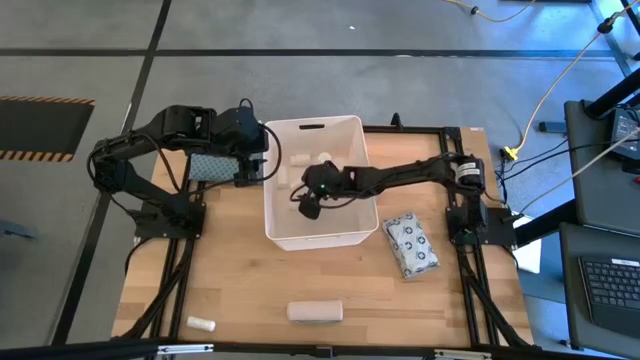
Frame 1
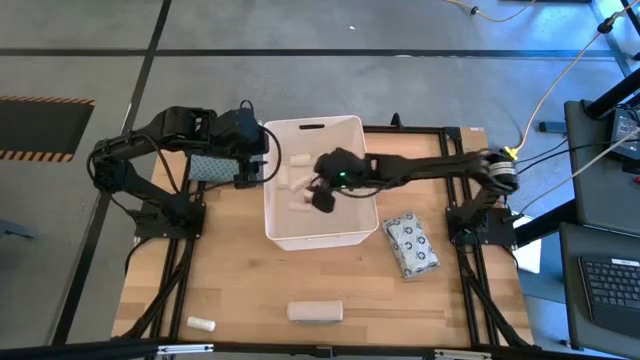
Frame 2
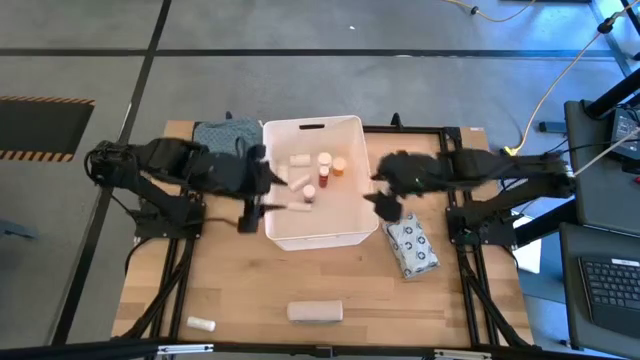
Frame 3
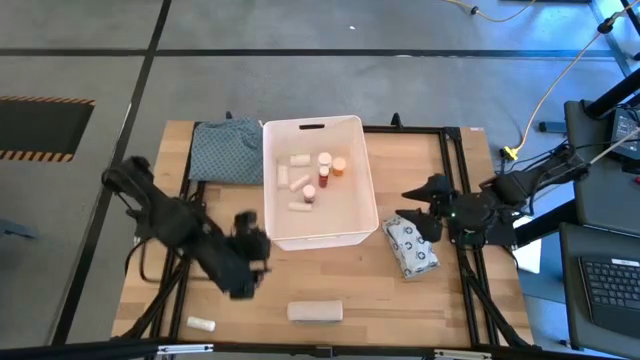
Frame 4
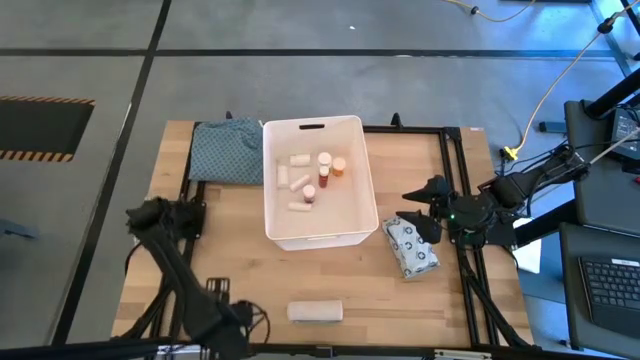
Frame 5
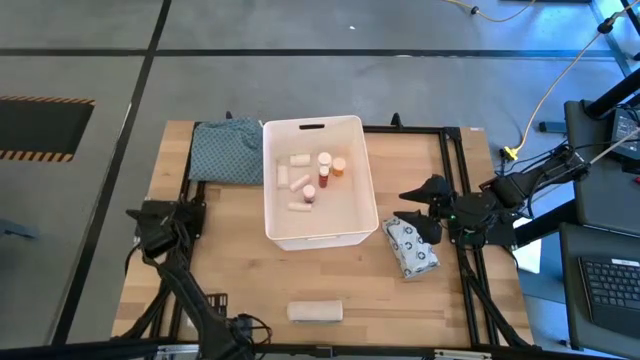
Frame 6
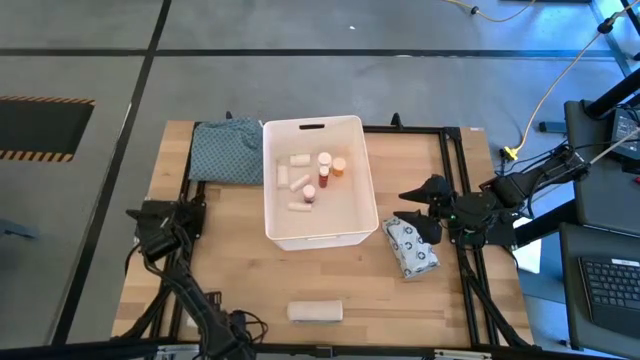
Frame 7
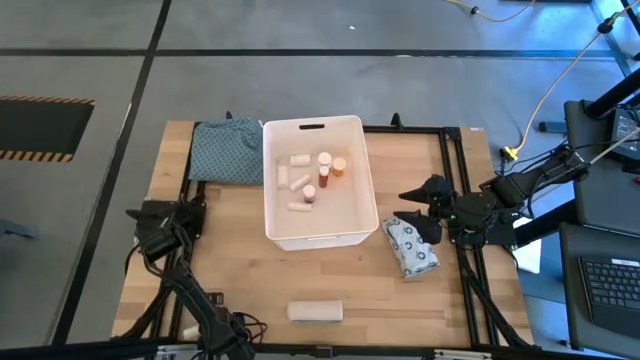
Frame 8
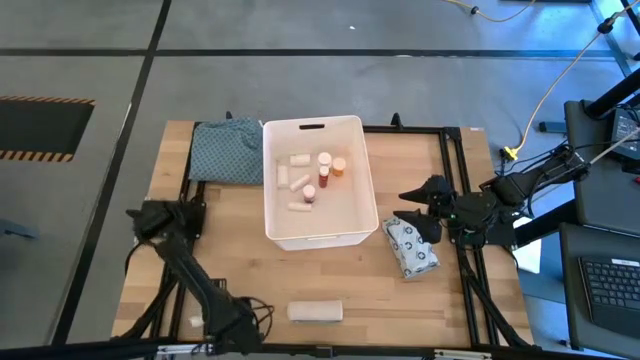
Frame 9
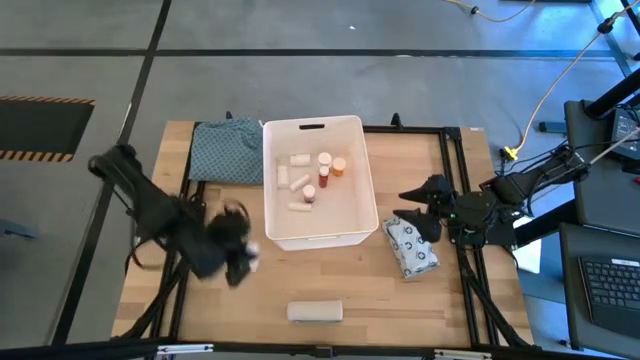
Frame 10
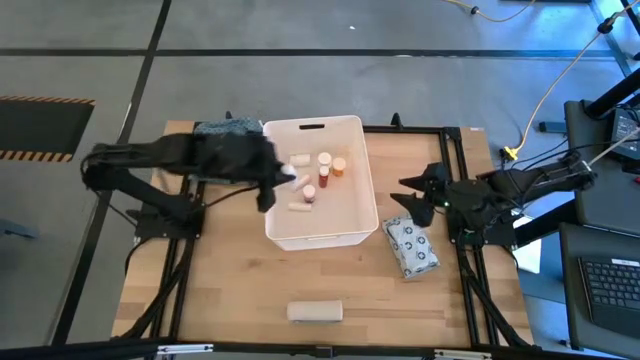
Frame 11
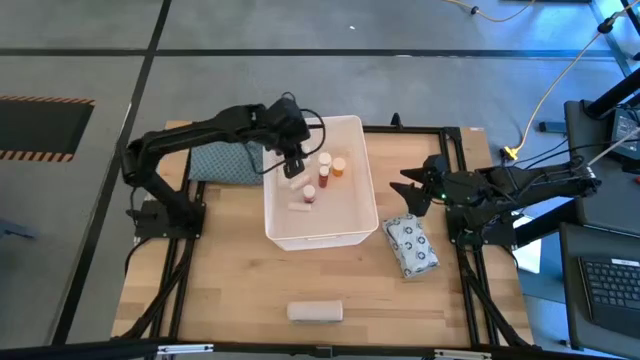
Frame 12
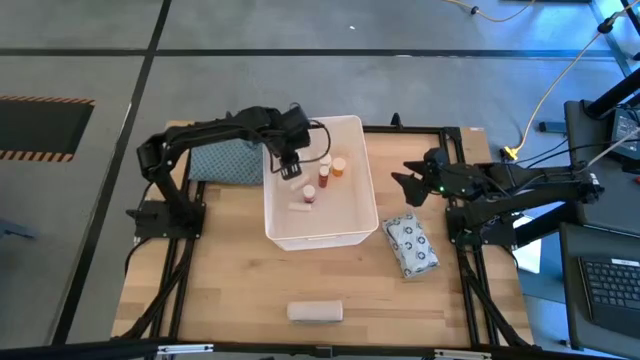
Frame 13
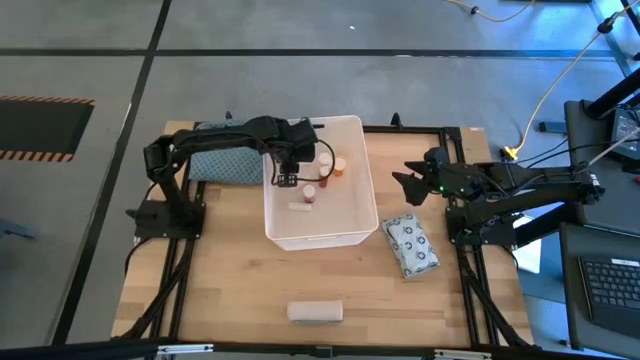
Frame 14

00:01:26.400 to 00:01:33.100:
Task: Pick & place medical supplies in basket/bin
Put the rolled gauze into the white bin

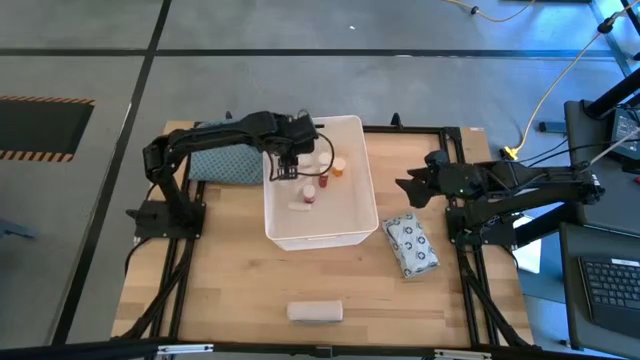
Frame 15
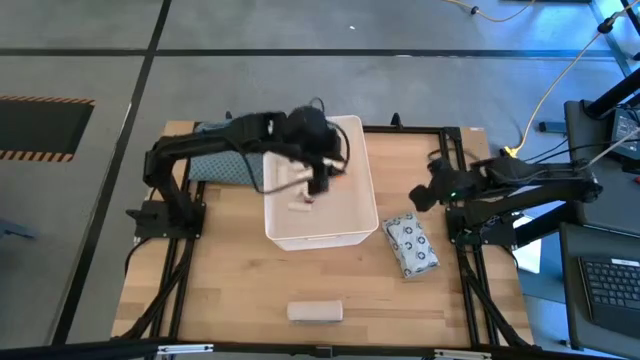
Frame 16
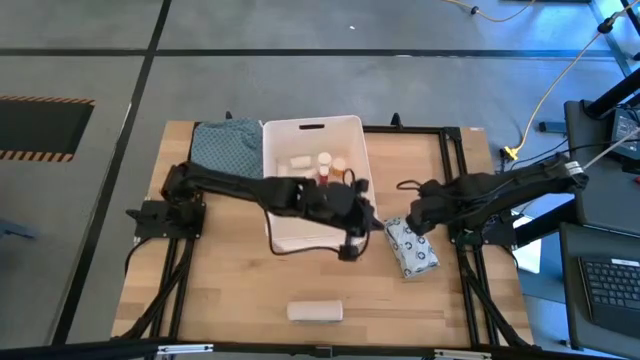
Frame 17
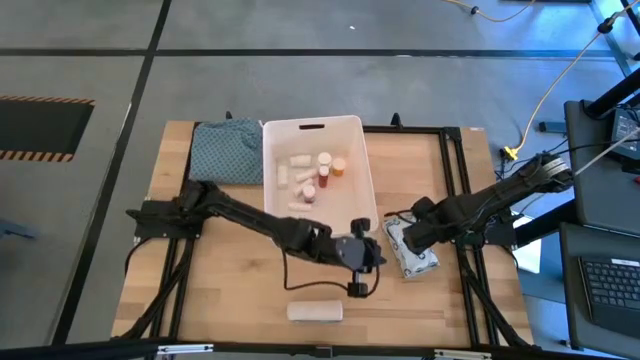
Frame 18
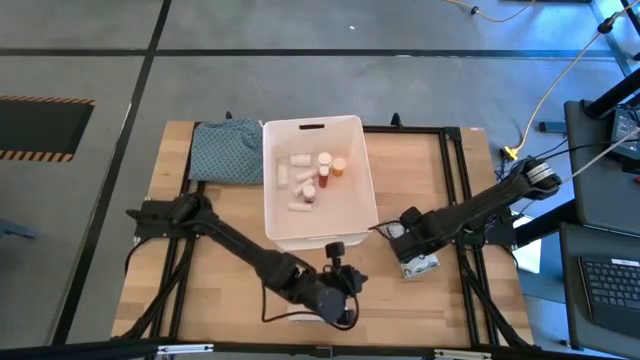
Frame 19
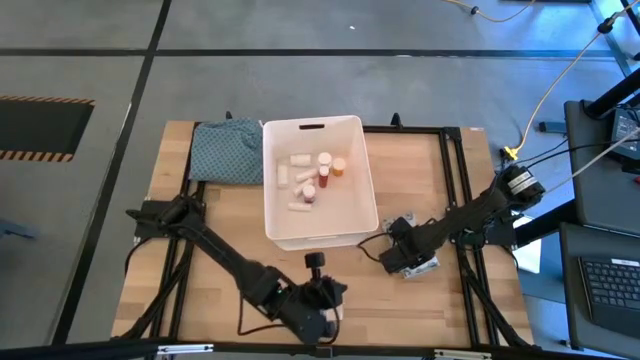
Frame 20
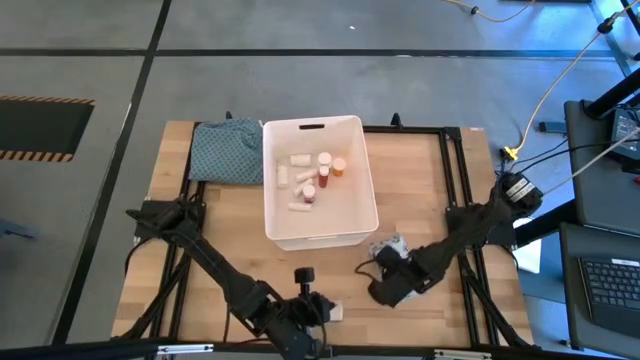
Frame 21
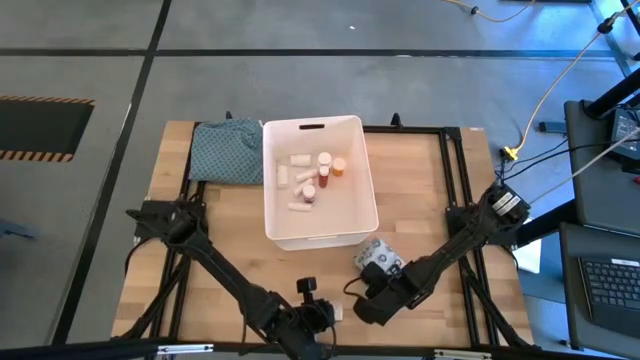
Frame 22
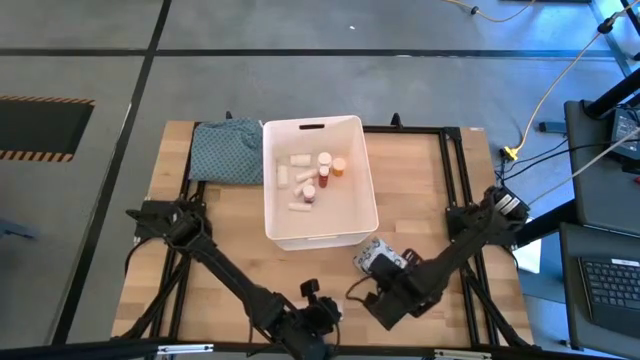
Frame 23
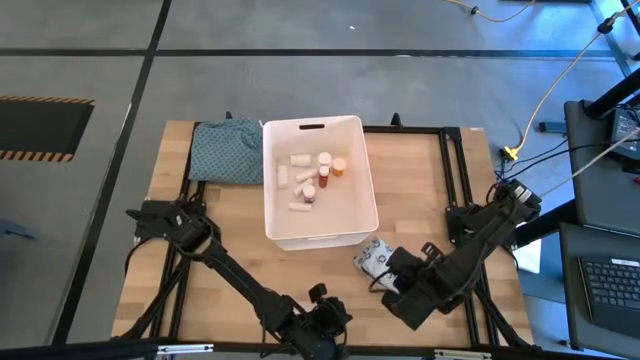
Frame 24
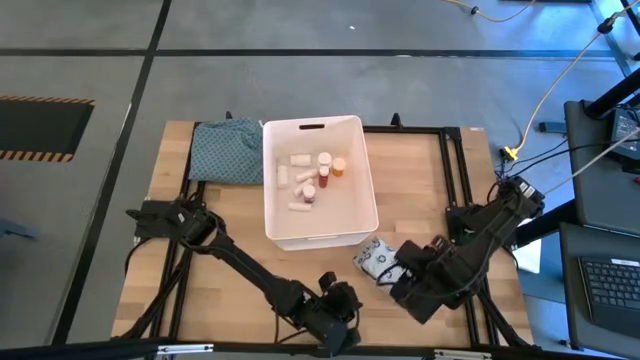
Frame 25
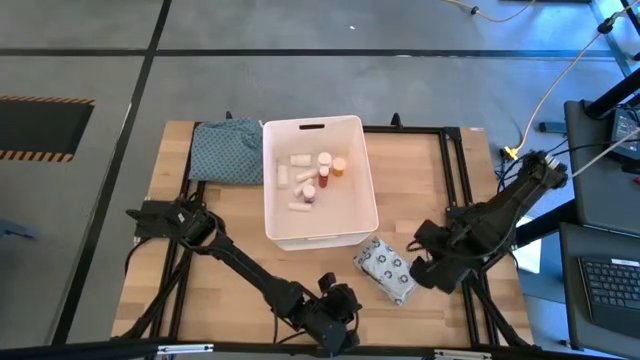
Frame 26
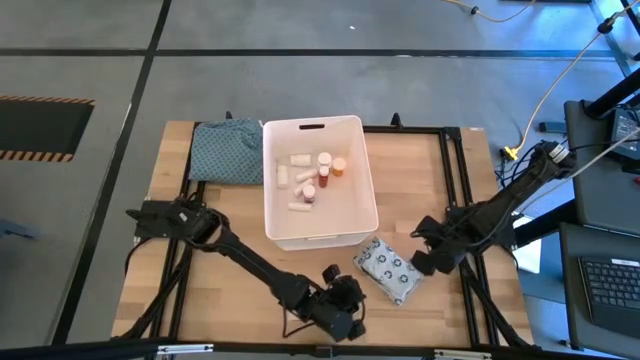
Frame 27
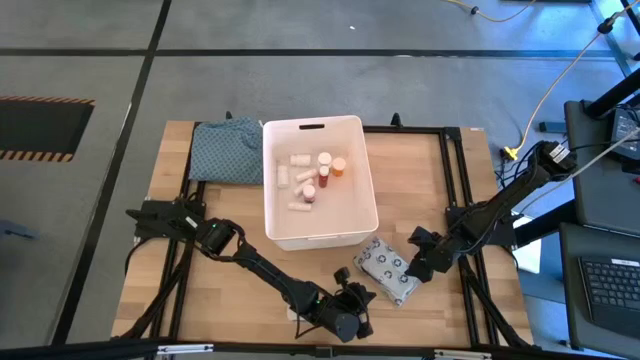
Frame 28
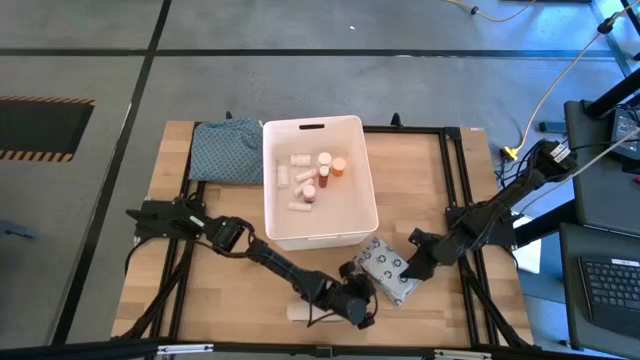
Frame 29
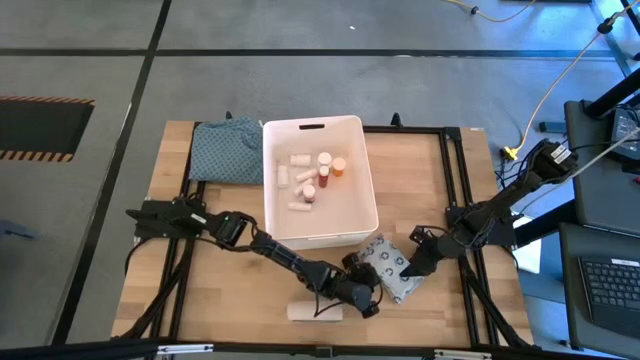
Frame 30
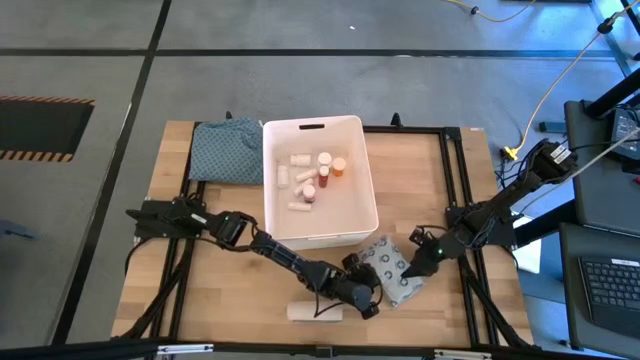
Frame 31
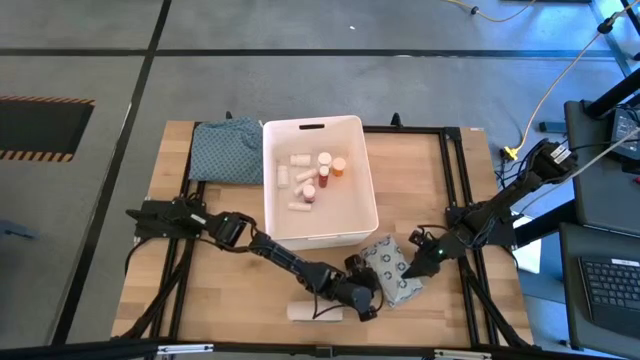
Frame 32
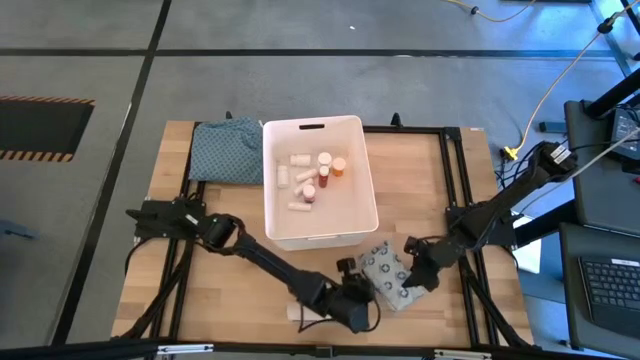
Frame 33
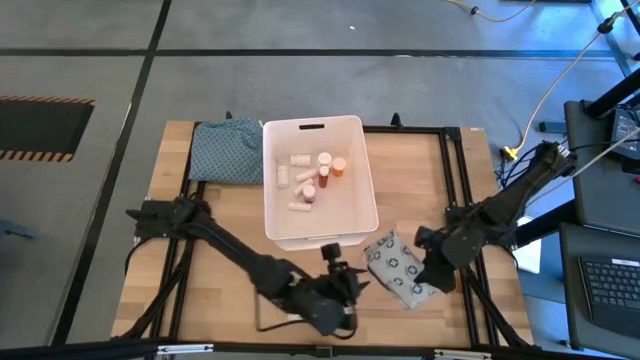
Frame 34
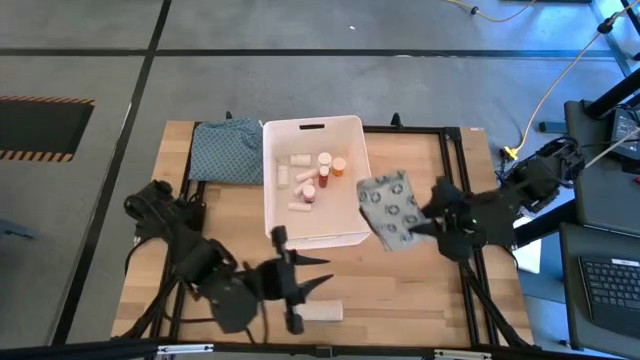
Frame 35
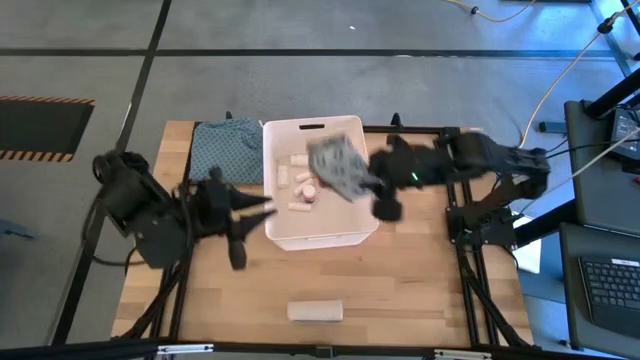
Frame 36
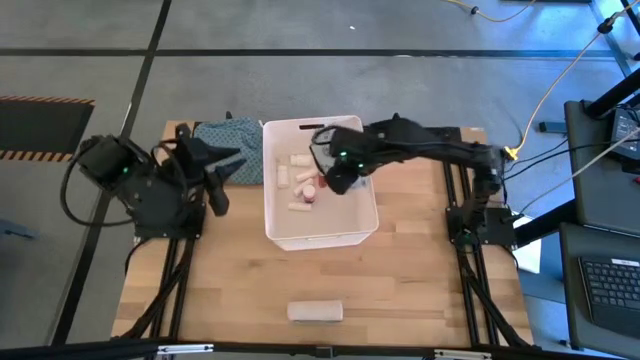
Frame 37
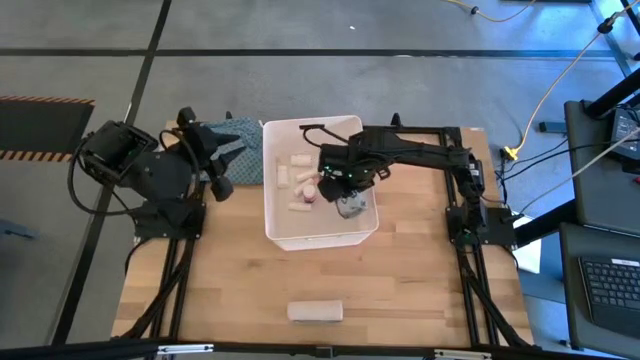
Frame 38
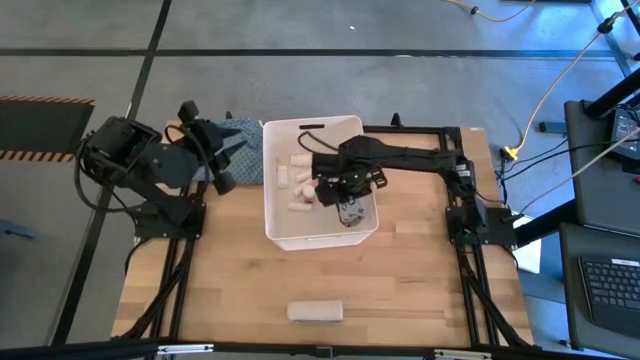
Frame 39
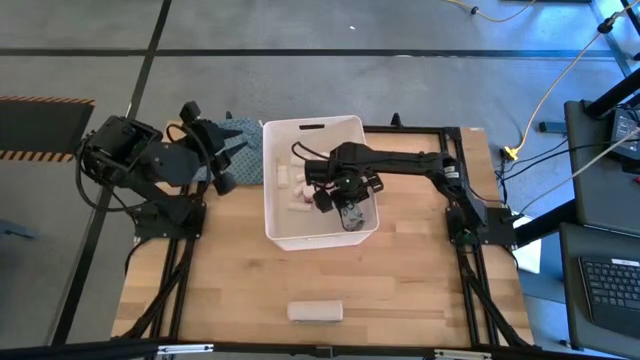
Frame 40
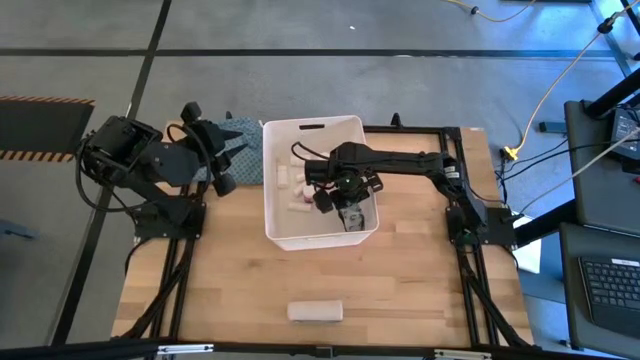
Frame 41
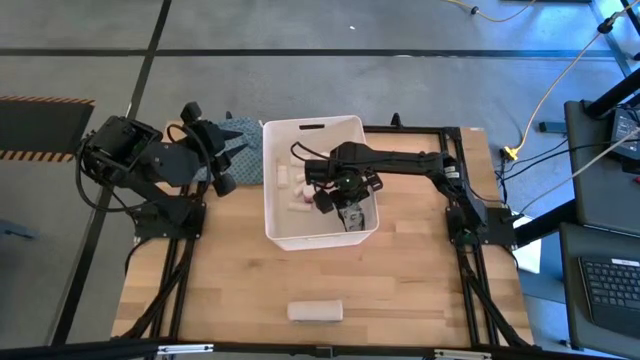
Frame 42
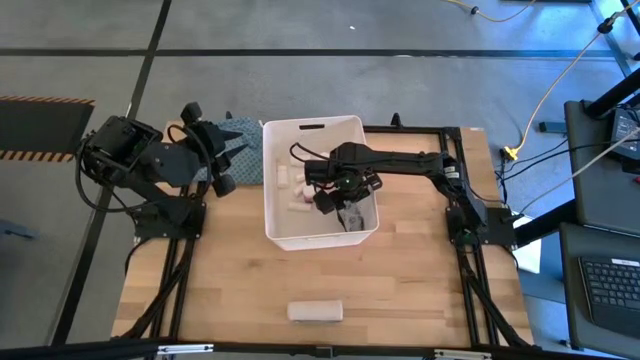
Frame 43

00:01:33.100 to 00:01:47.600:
Put the white mailer bag into the white bin
